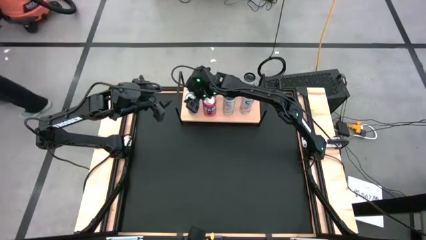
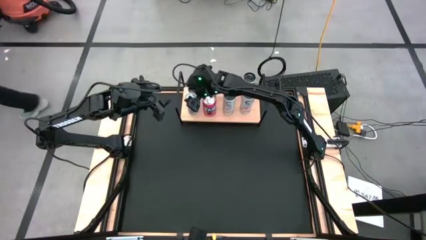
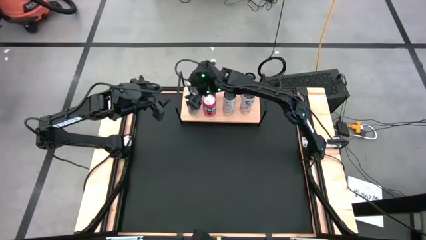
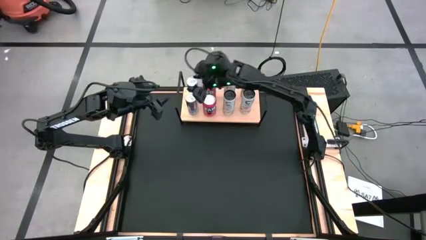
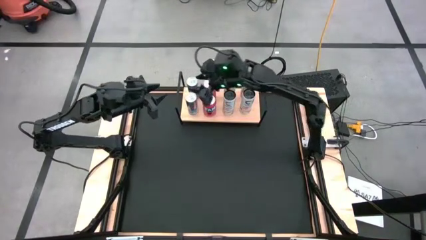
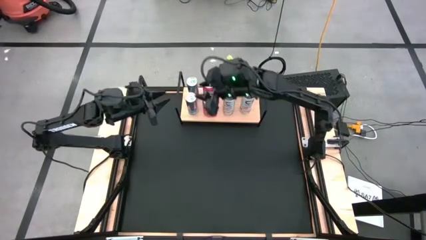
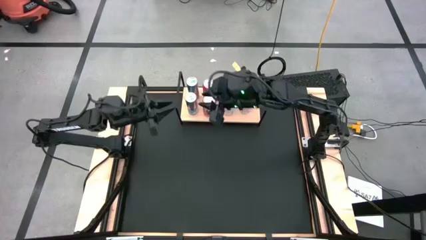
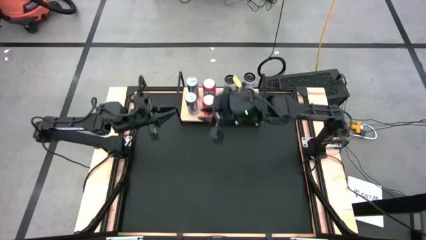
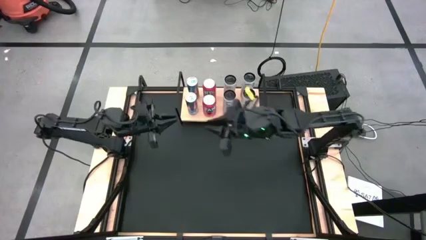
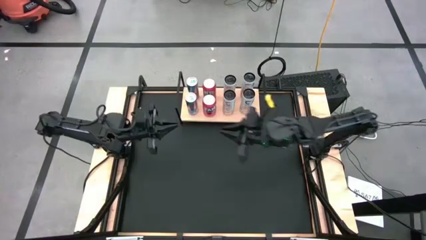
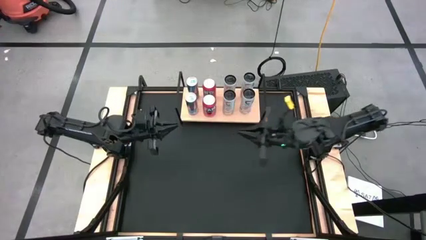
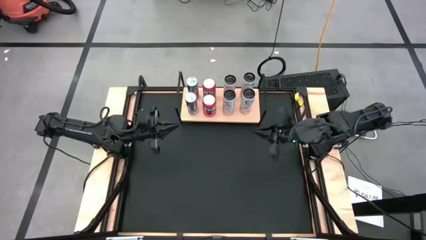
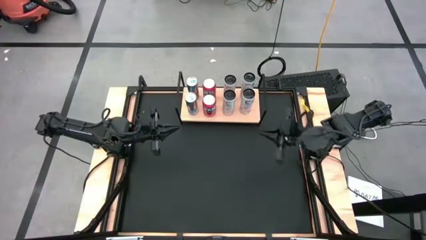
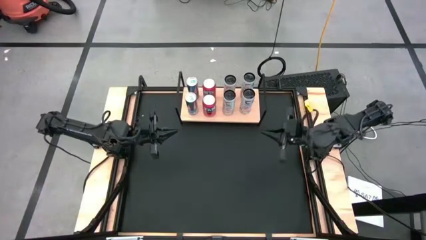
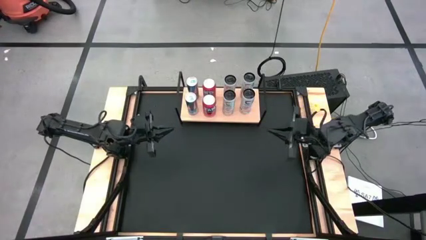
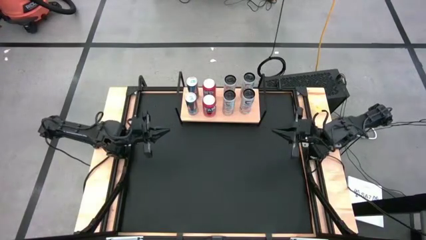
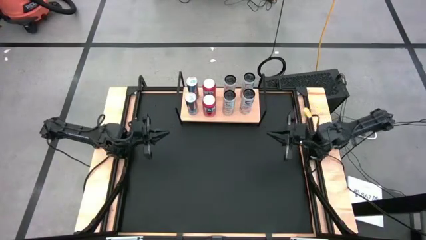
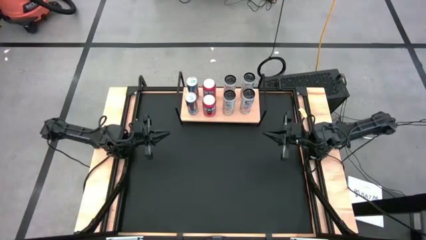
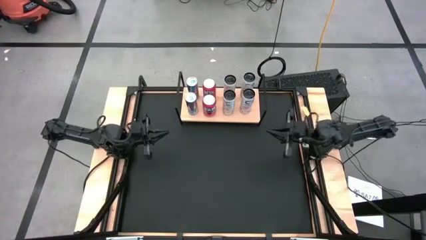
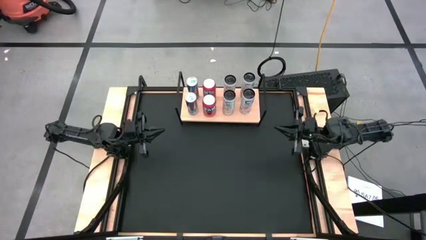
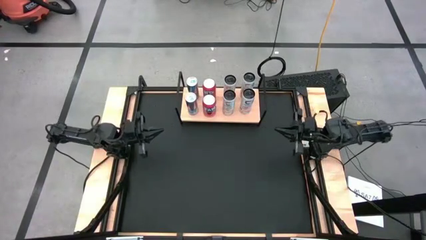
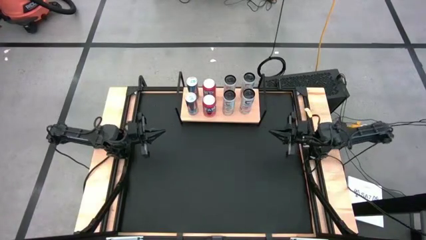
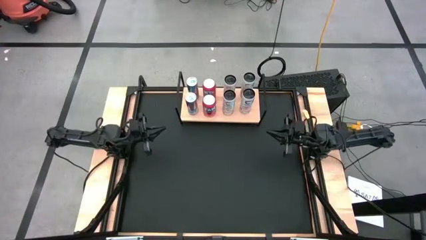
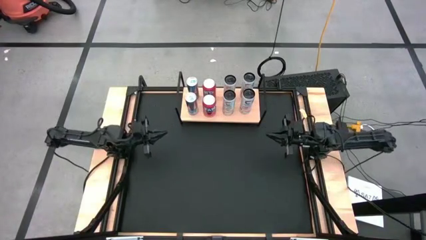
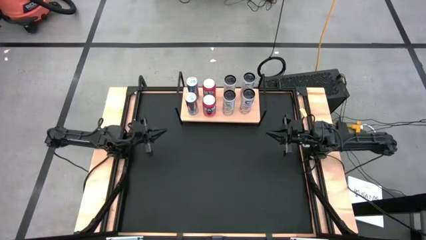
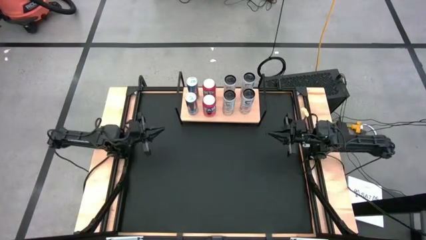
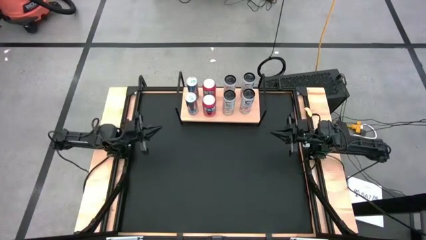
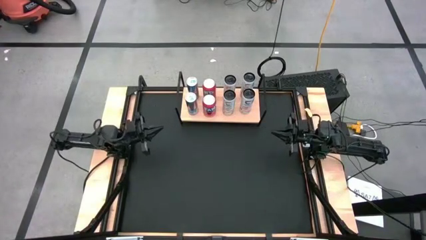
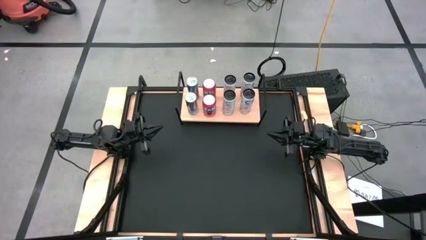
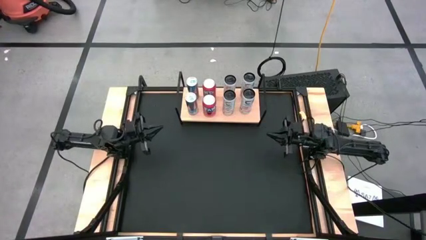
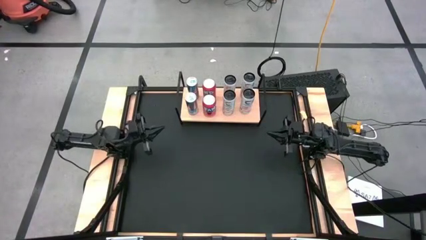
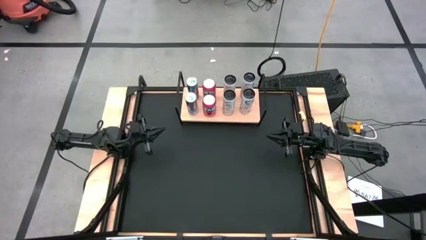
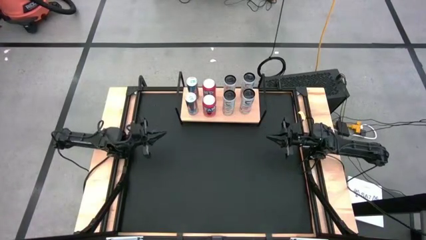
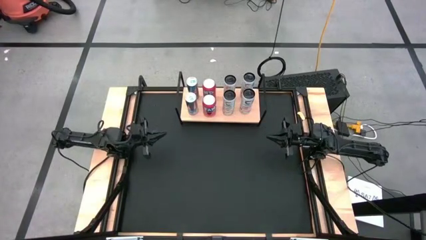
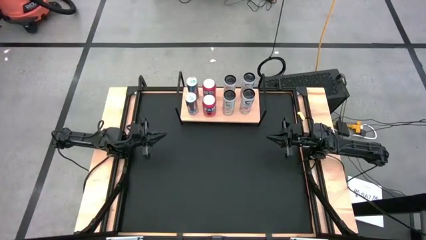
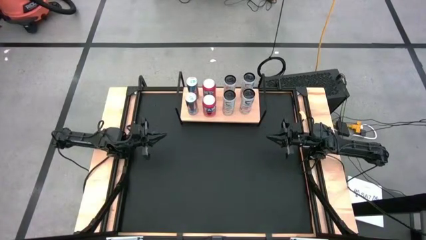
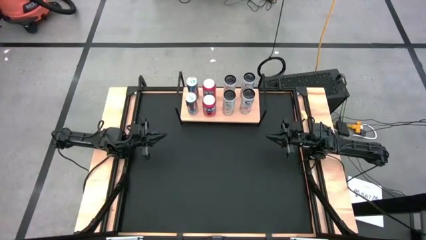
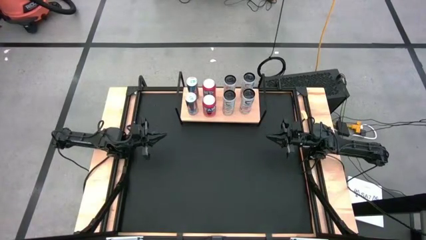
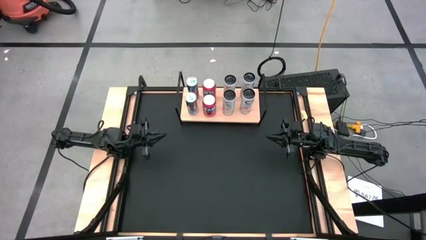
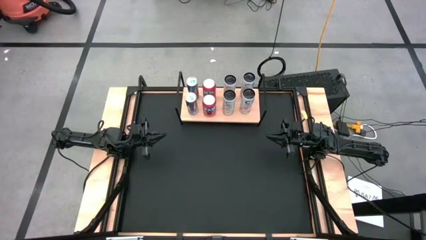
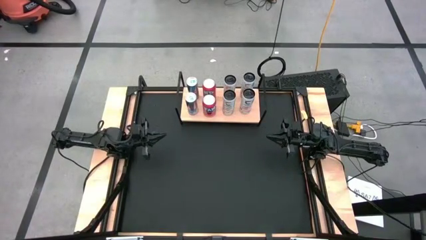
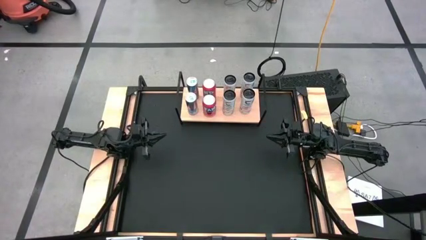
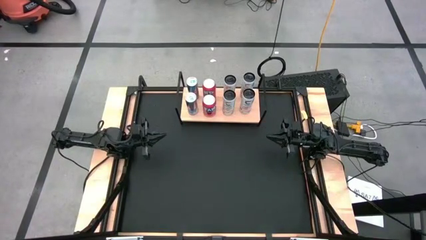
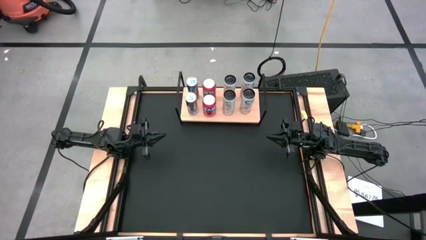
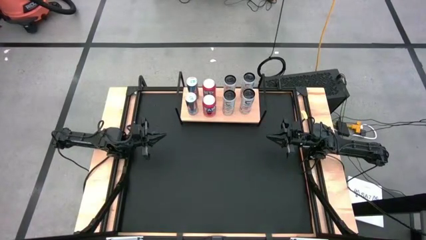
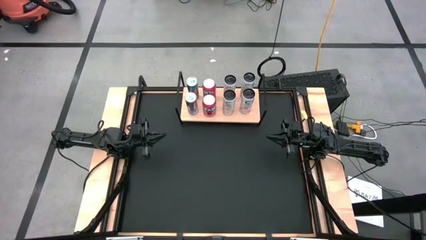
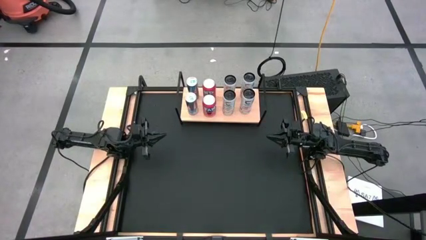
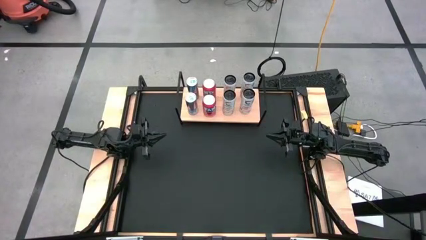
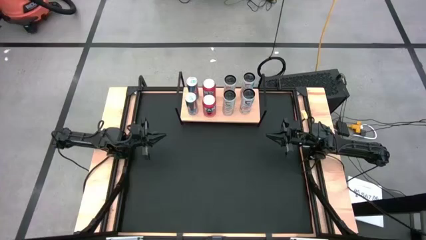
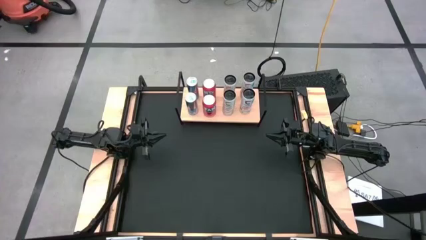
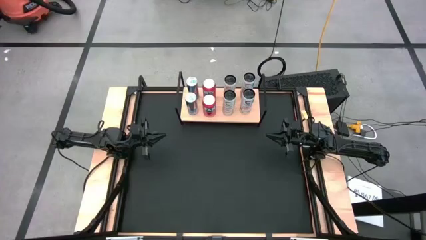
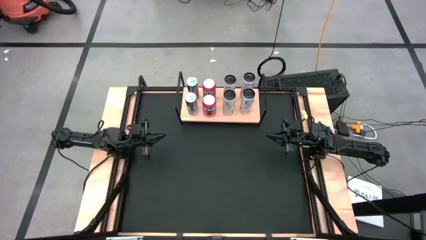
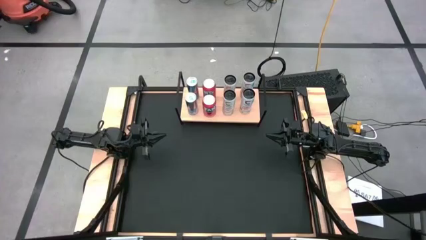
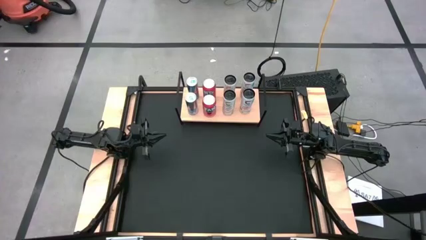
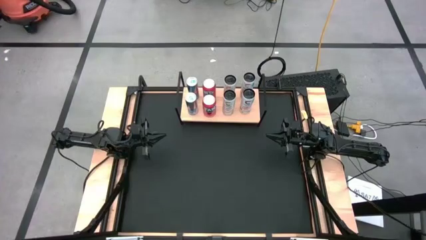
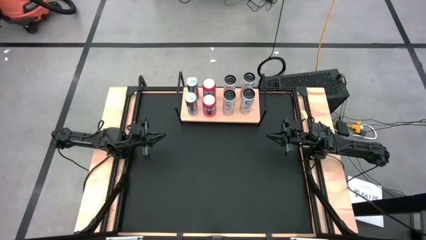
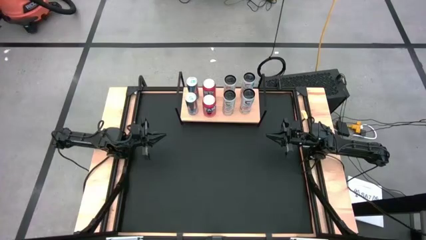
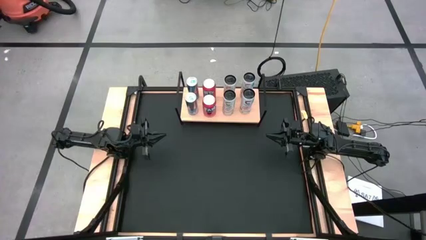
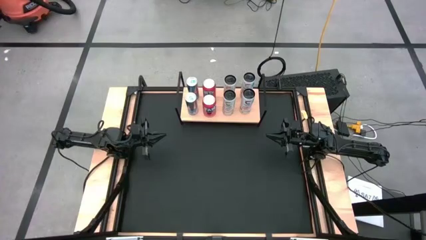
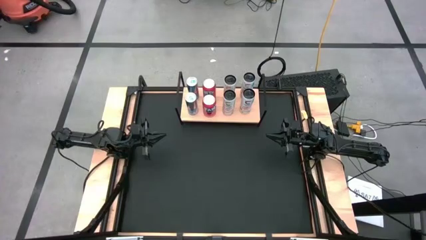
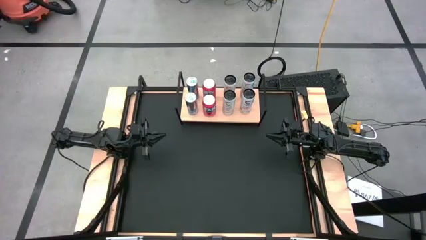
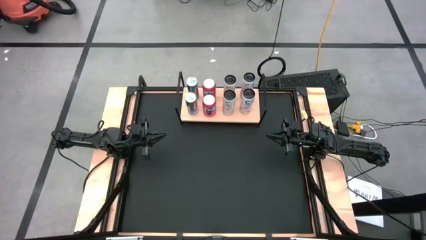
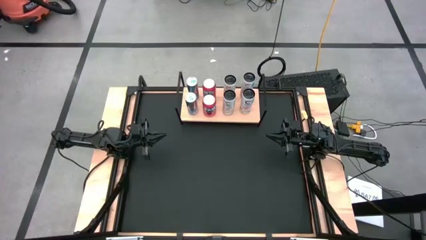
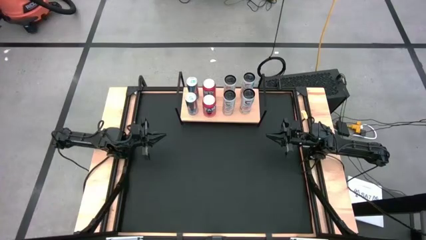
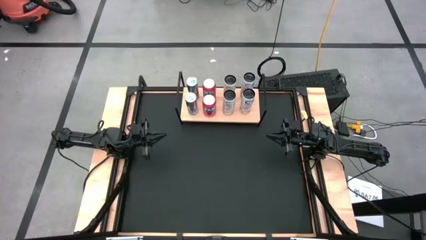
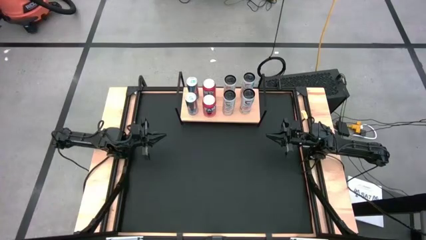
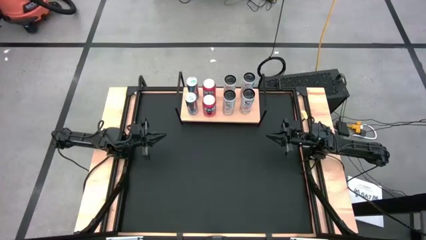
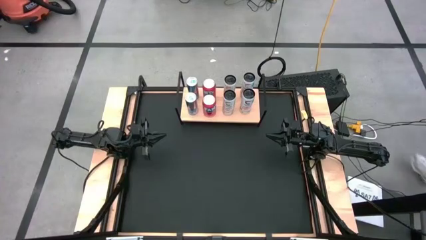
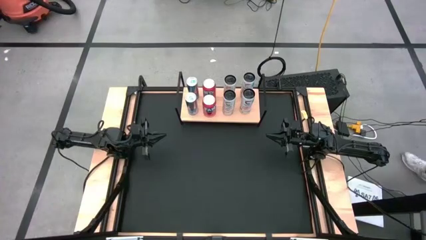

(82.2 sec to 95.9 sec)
Task: Place canned beverage on shelf
Return to Home Position
